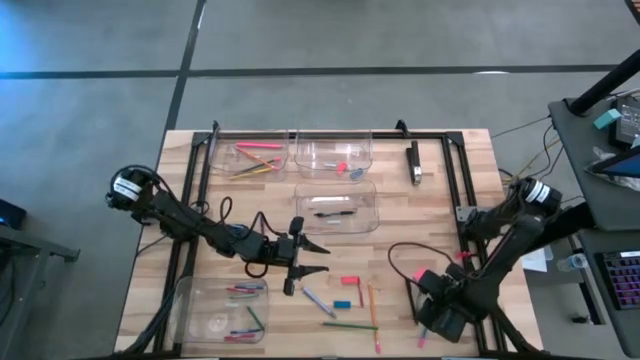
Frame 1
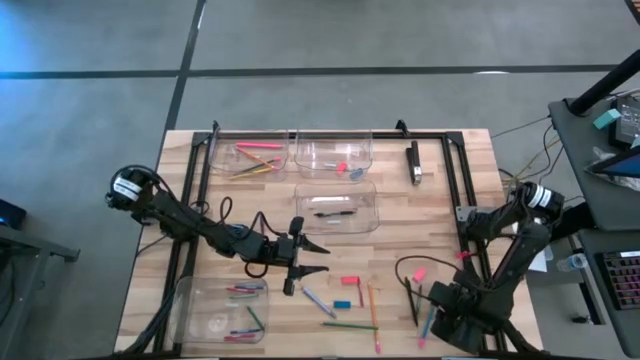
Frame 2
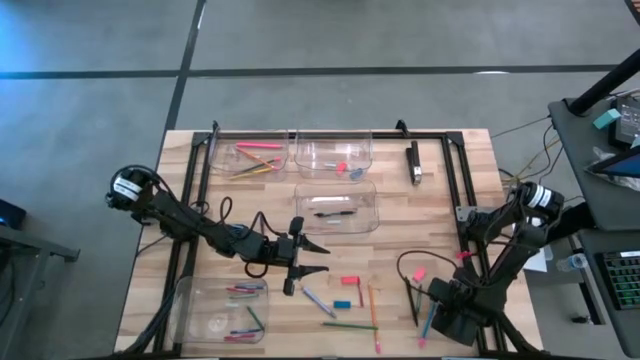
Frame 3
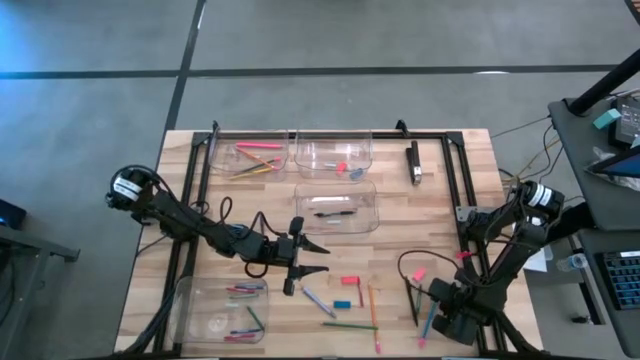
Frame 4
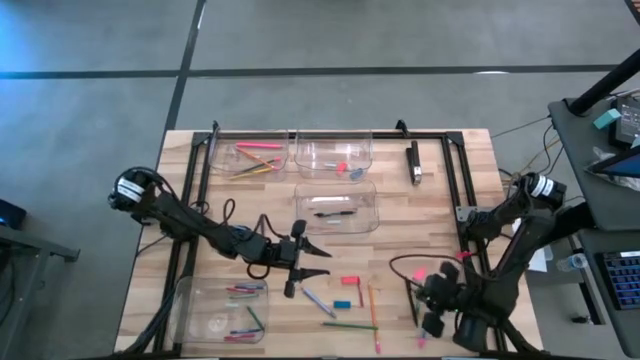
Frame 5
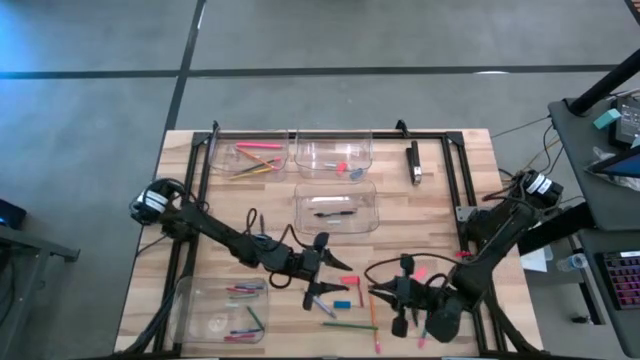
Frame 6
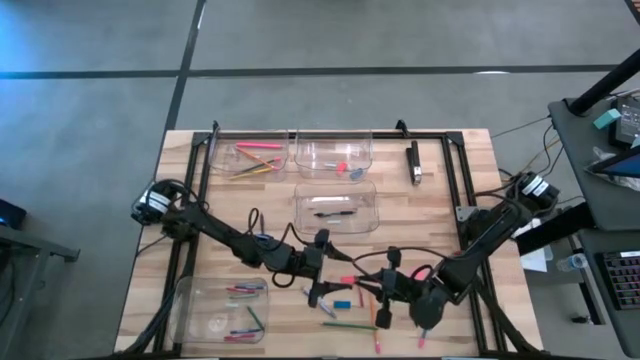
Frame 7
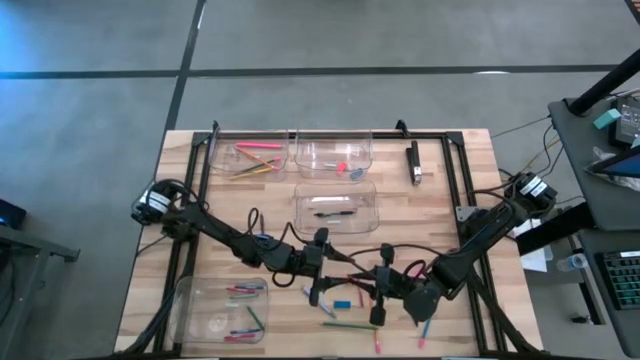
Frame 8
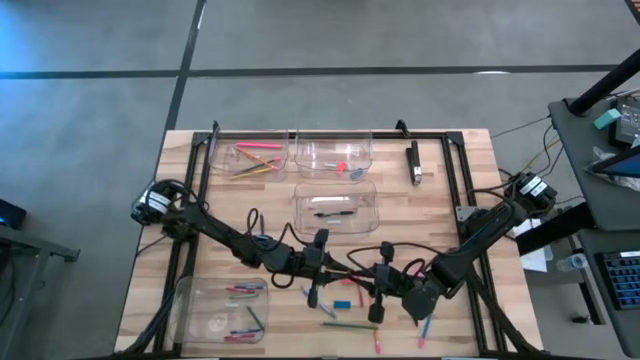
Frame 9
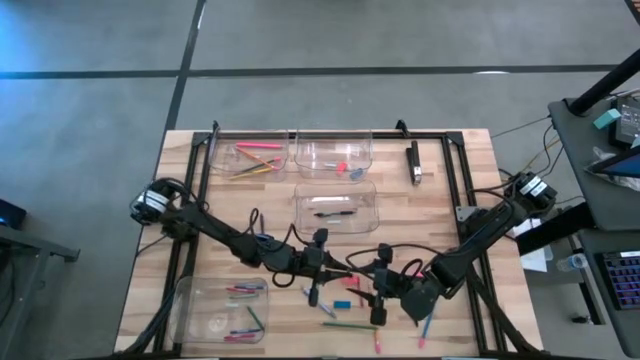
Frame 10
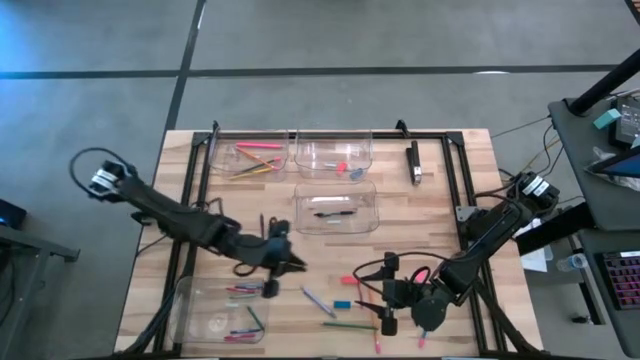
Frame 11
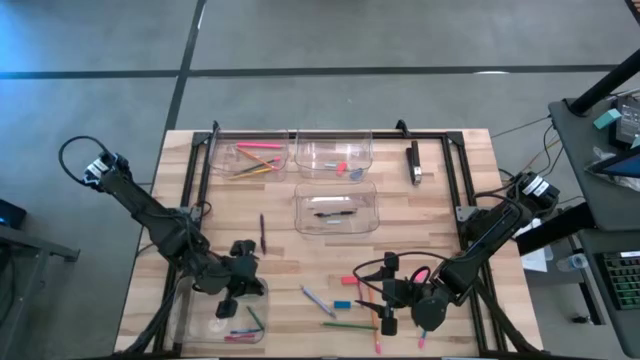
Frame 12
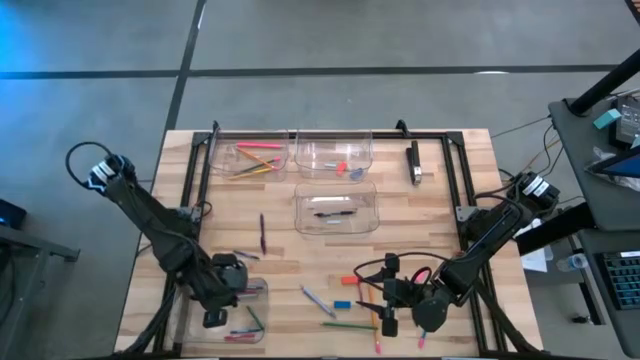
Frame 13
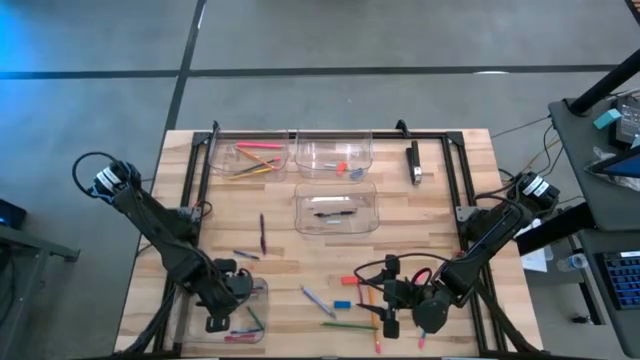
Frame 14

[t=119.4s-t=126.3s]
Task: Sort crayons/erasers/pens/pencils in bins
Put the gray crayon into the bottom transparent bin

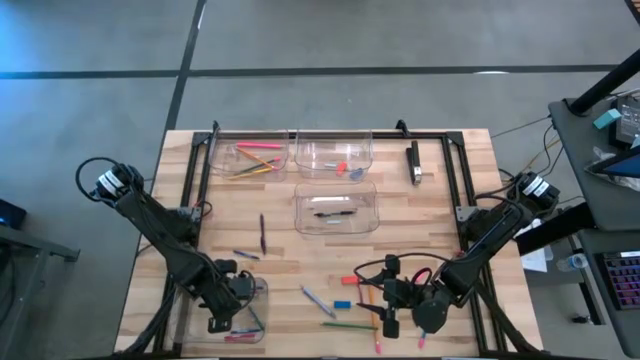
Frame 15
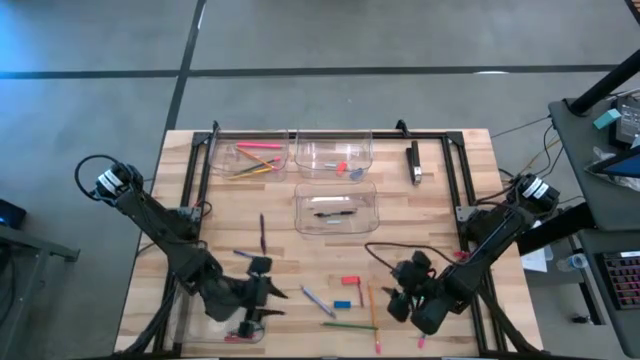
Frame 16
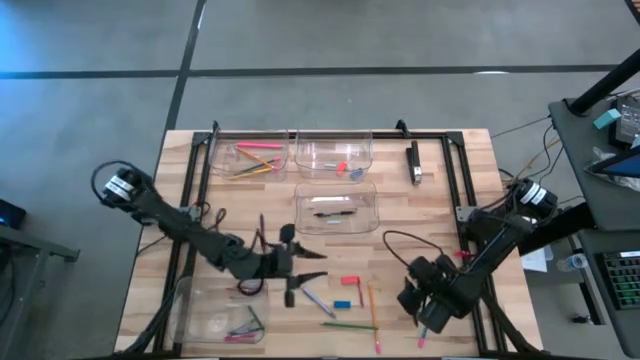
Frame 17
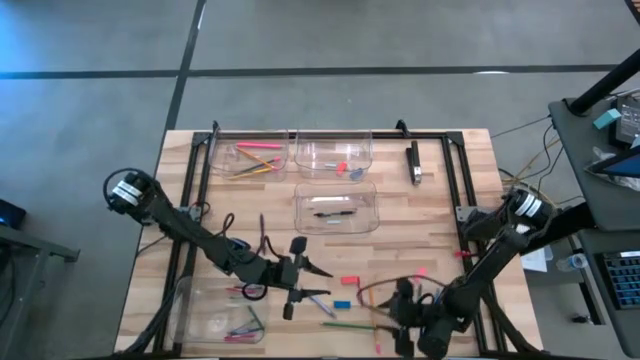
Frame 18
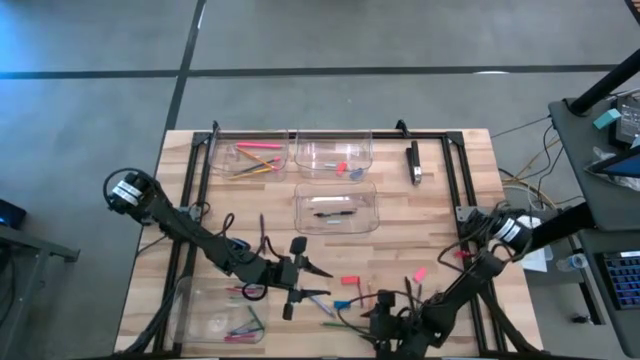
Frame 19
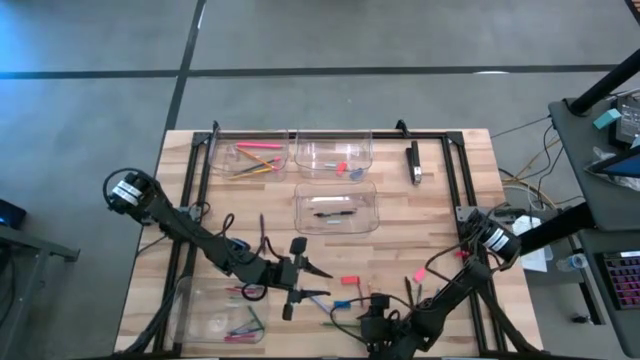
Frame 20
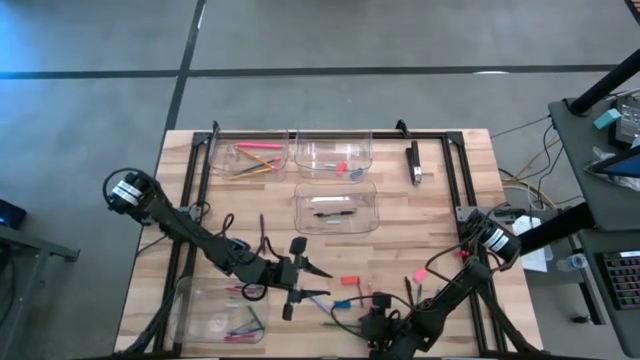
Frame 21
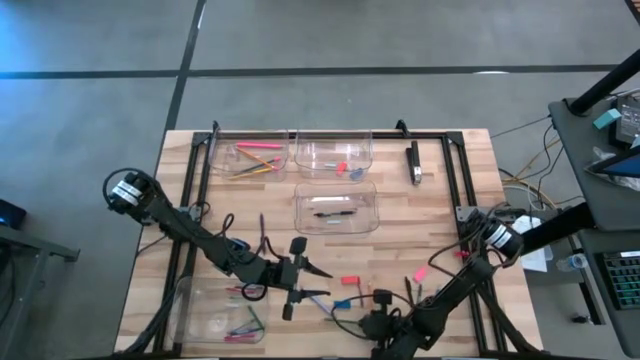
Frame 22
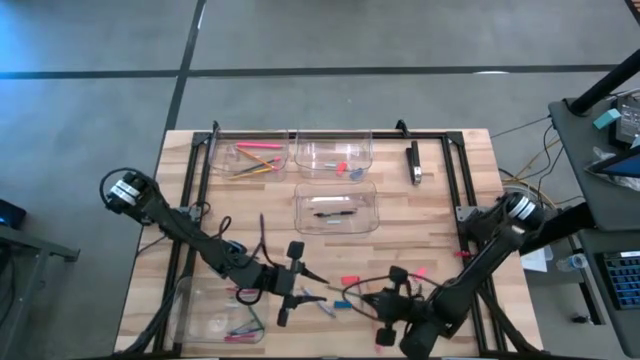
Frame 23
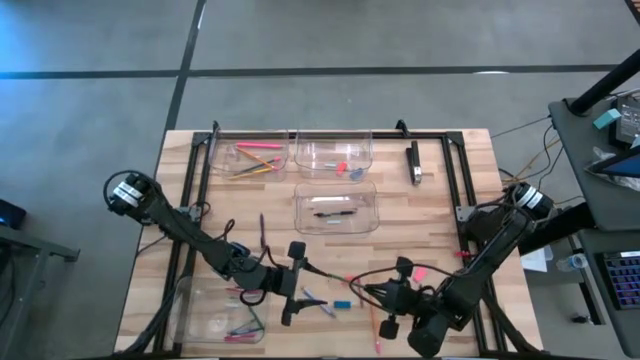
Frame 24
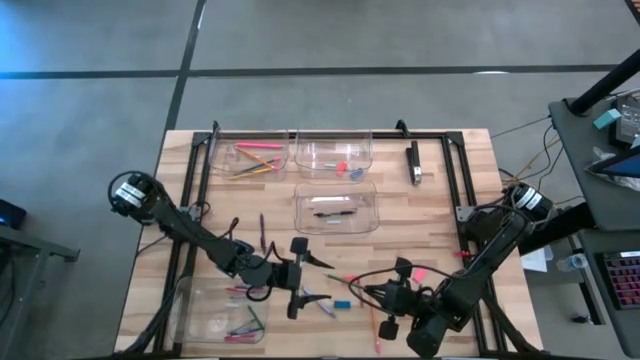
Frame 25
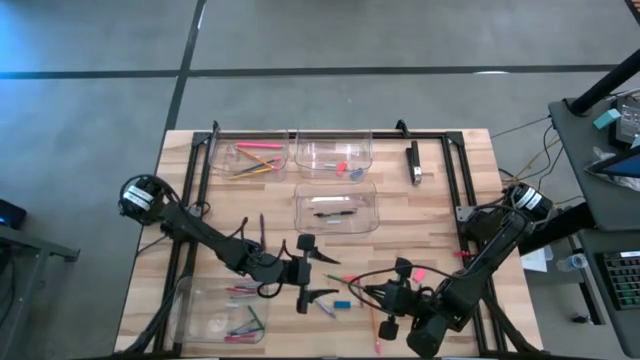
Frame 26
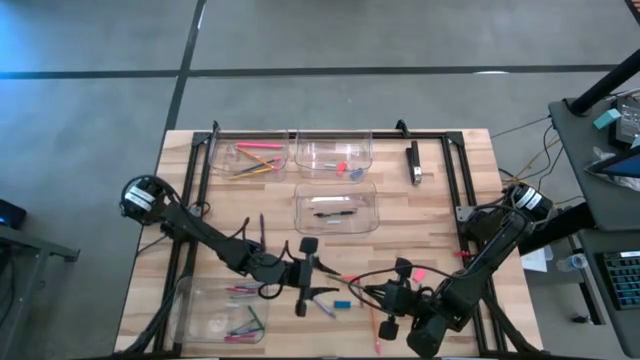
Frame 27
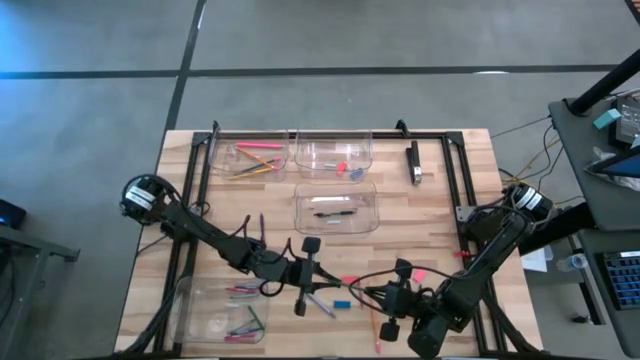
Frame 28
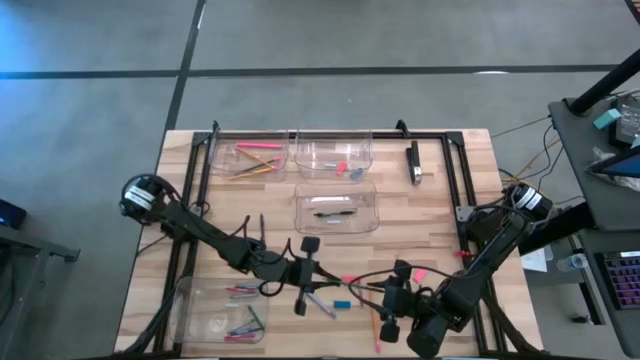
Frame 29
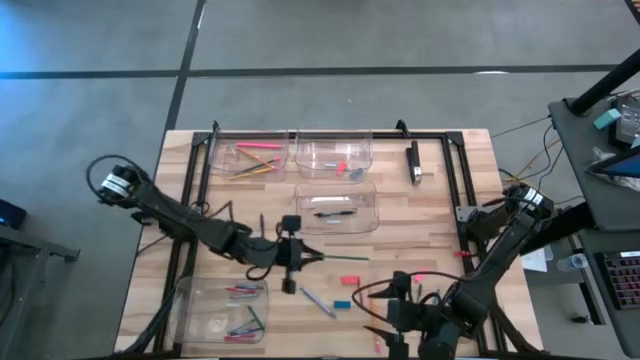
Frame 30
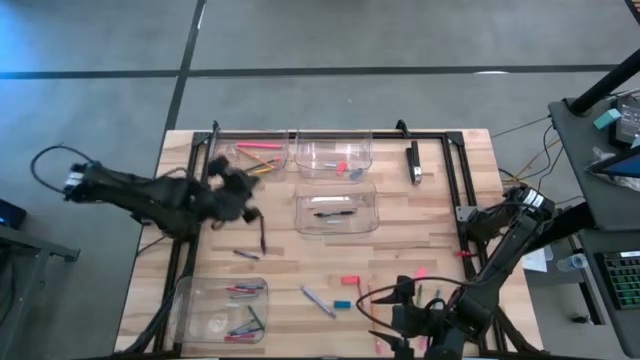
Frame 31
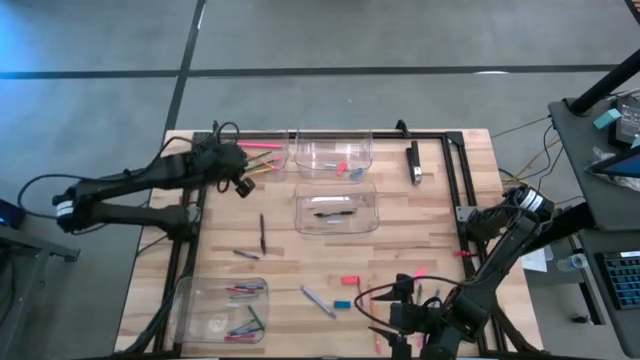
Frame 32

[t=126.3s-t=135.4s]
Put the green pencil into the top left transparent bin

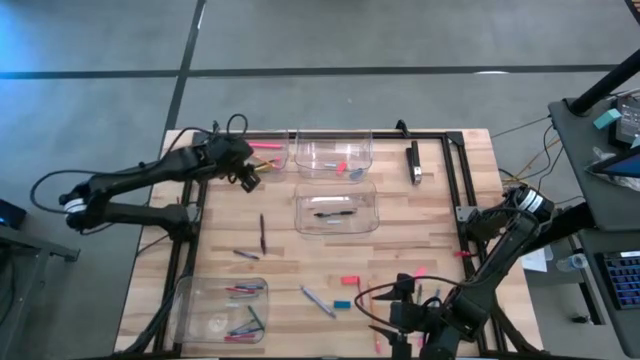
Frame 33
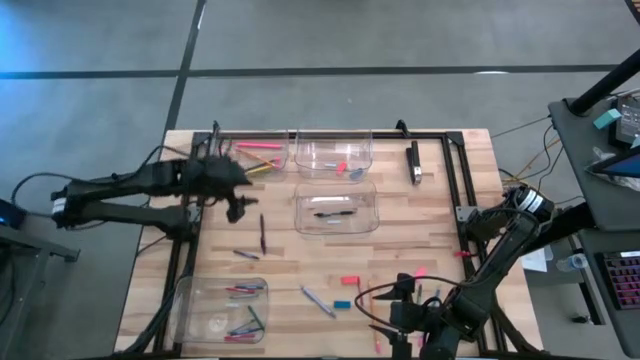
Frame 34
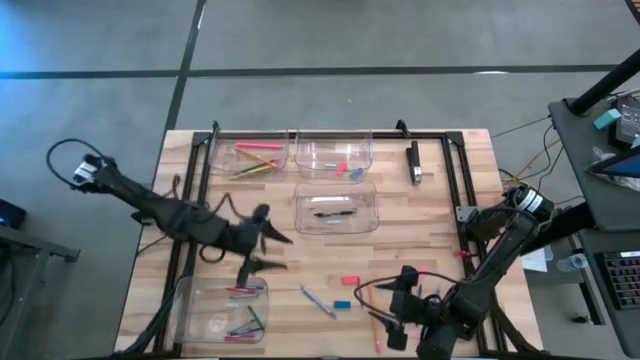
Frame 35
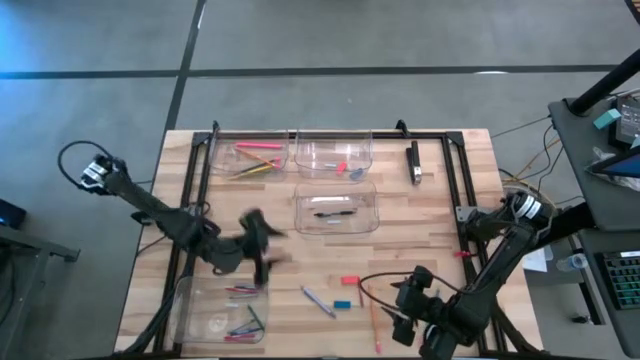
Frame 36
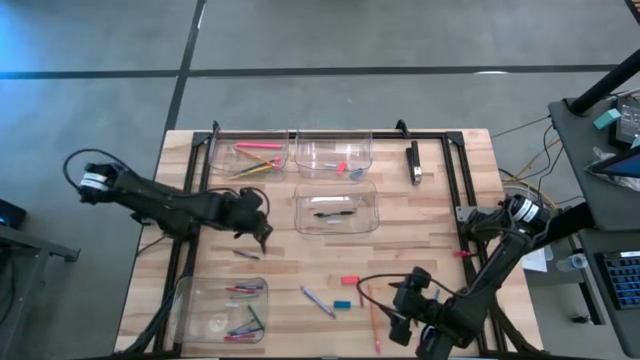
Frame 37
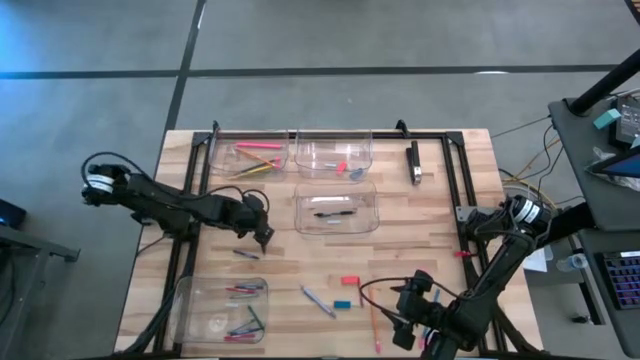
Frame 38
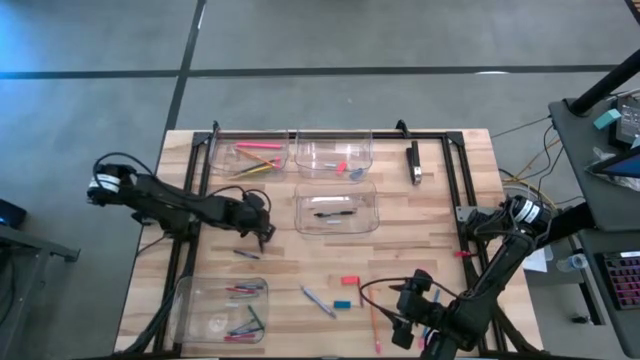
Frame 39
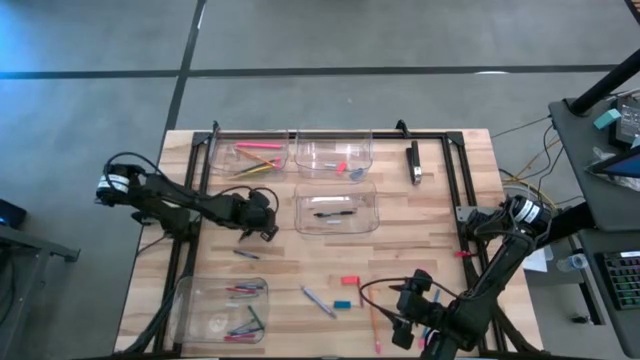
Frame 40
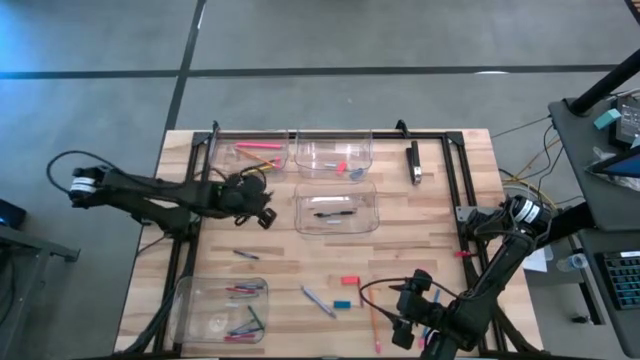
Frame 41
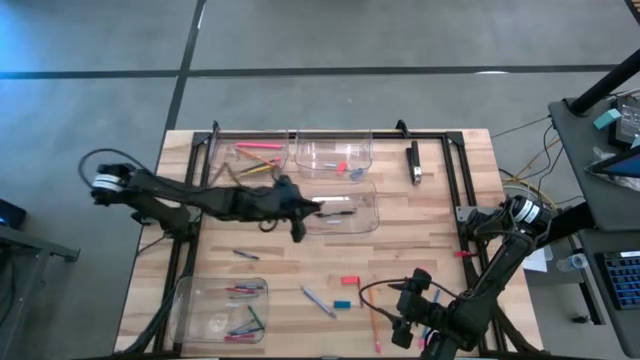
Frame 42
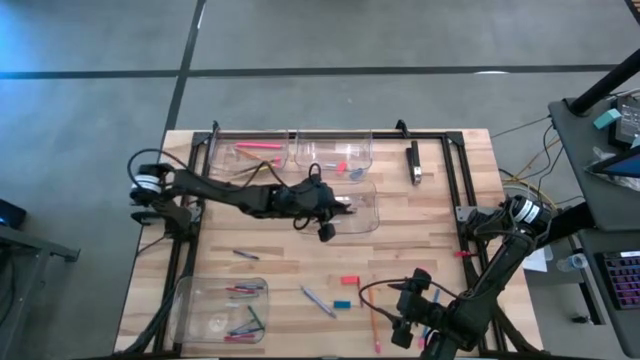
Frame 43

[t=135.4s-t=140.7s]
Put the purple pen into the middle transparent bin
